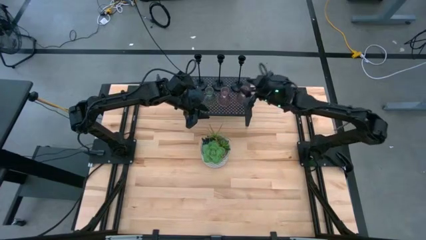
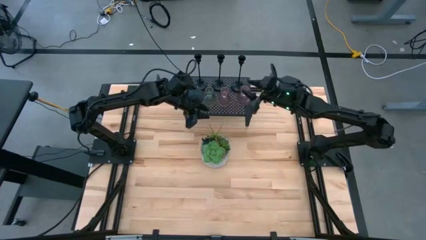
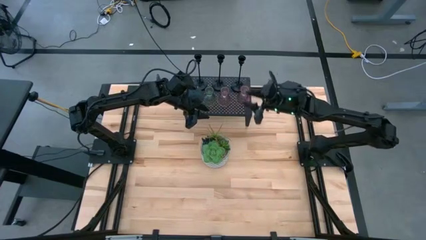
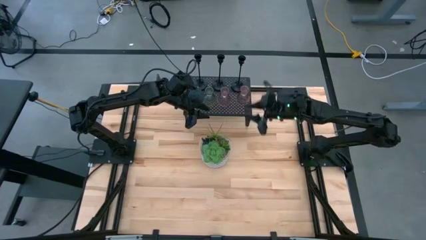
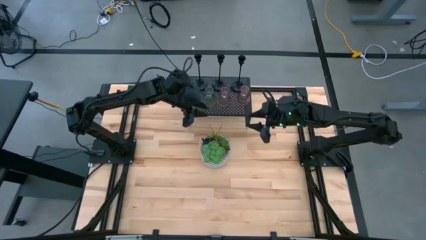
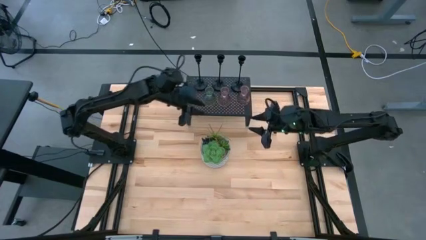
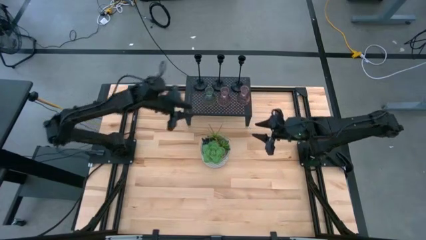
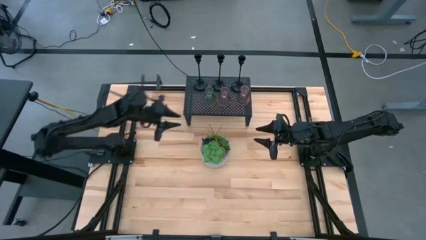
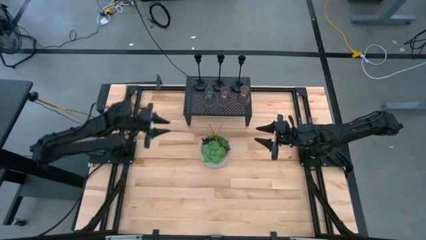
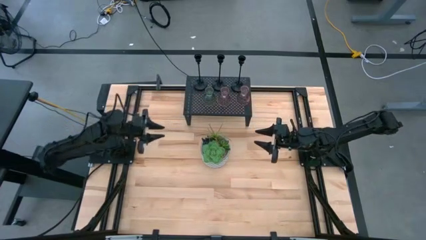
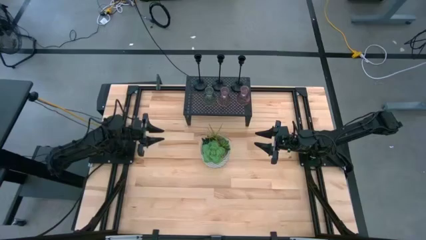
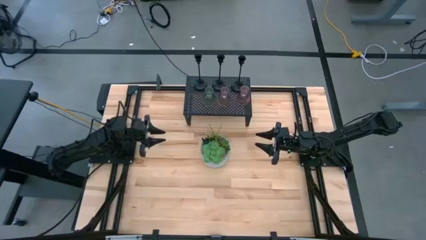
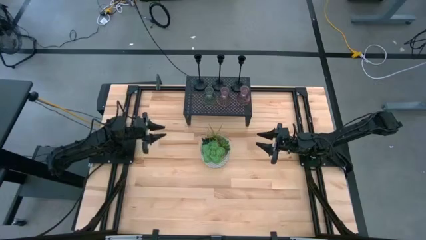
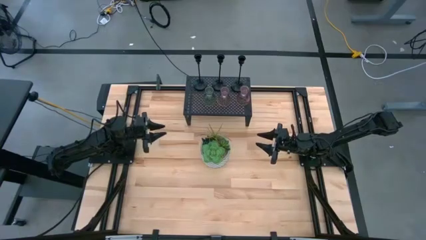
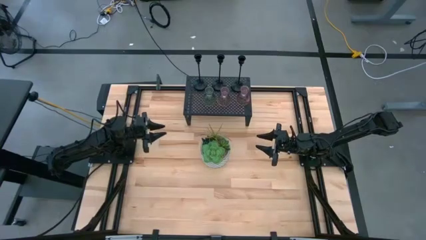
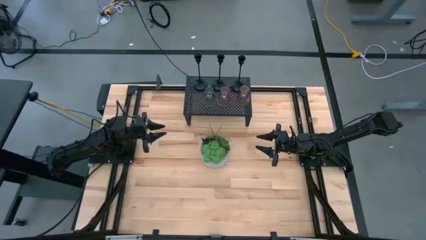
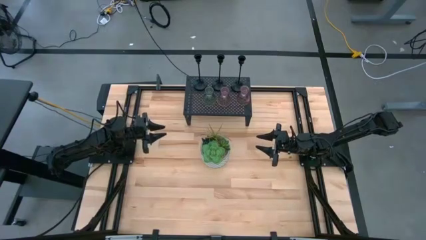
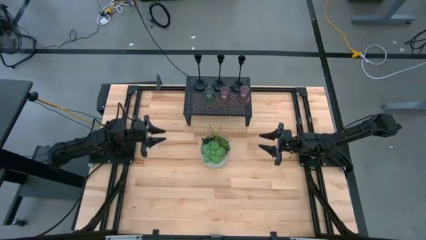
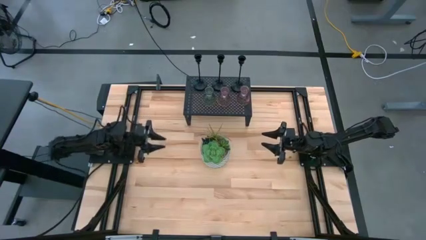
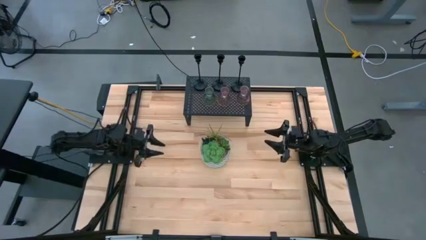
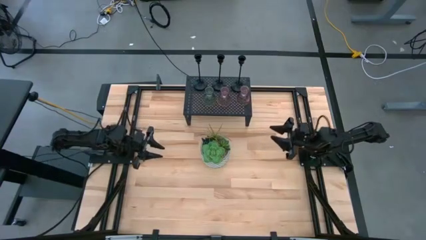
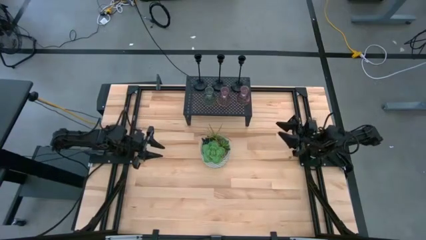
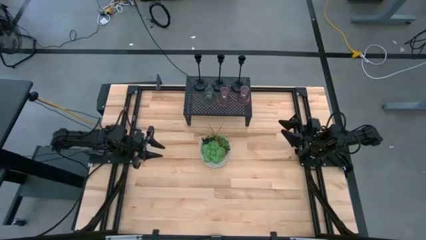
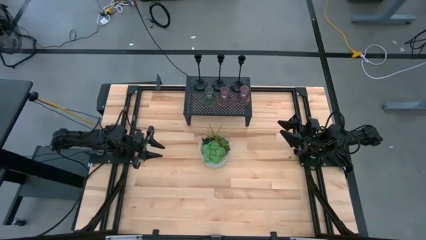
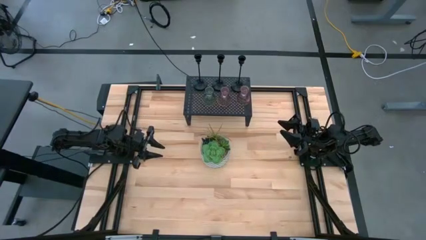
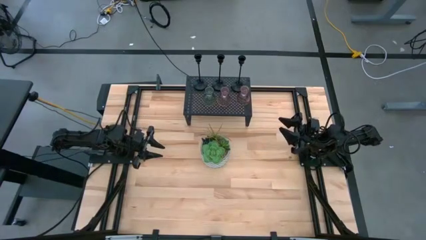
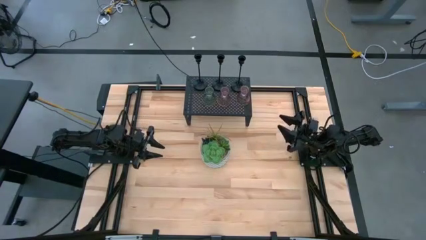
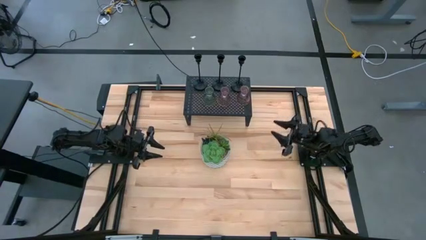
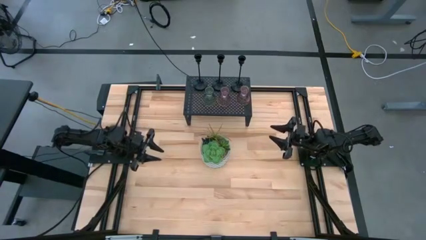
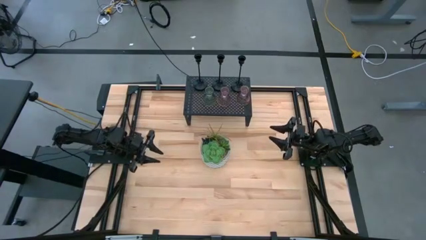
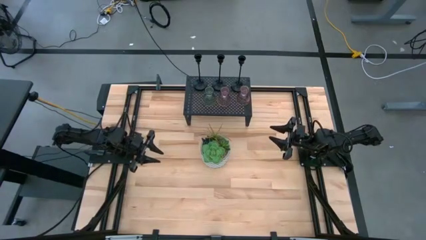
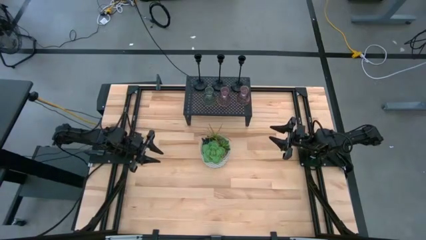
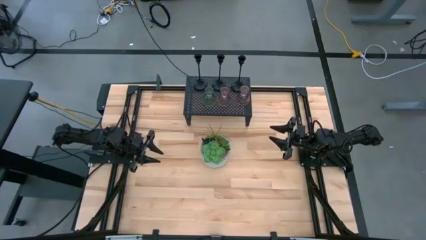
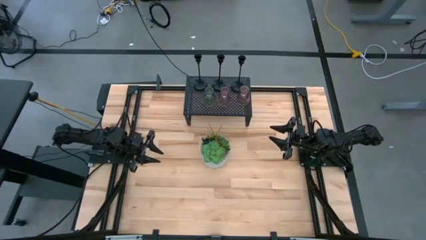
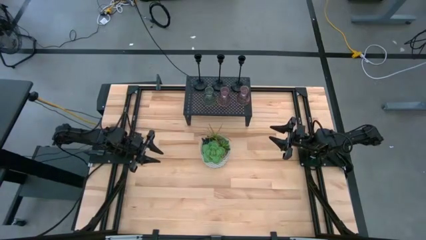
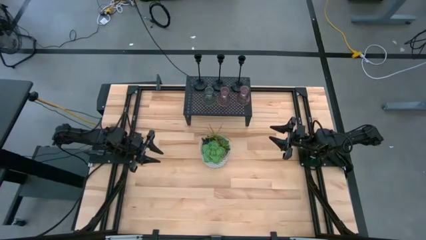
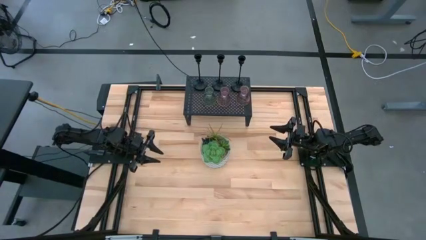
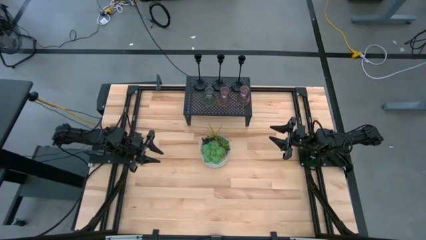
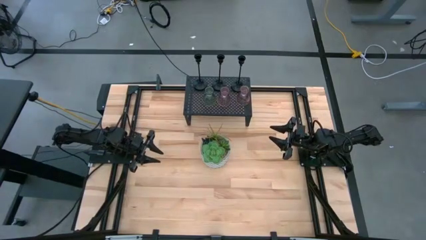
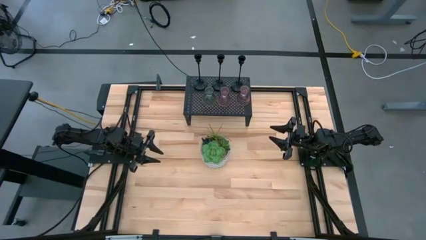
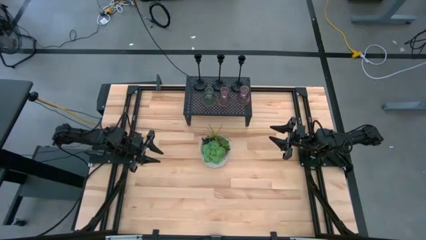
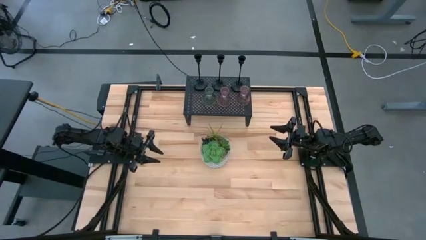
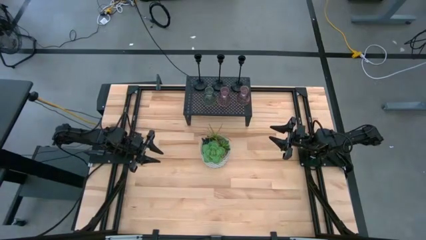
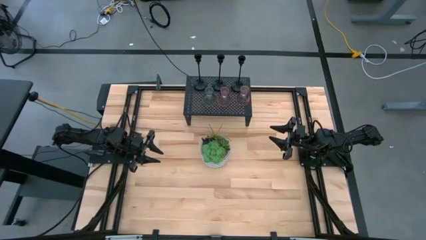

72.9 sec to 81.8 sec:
Task: Pick & Place candle stick holders
Return to Home Position

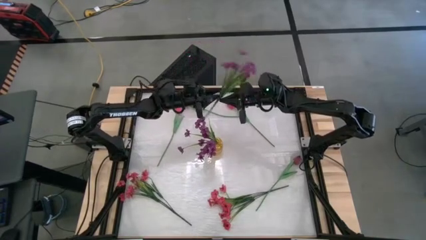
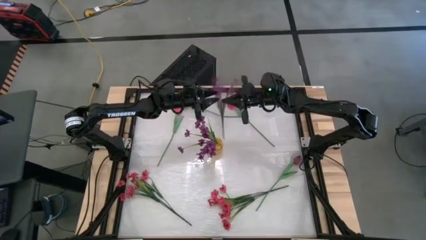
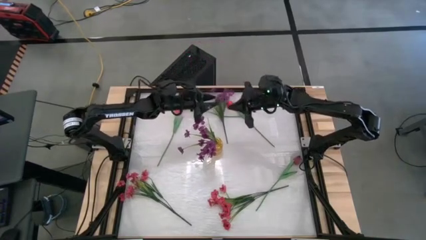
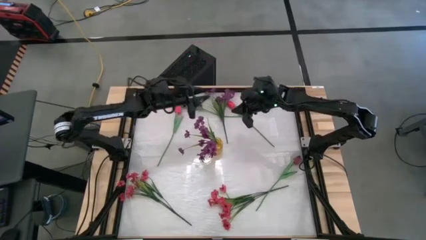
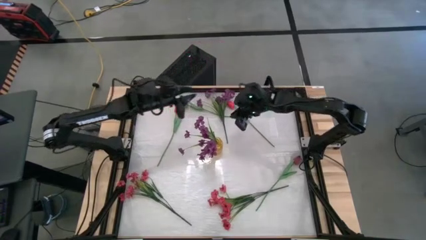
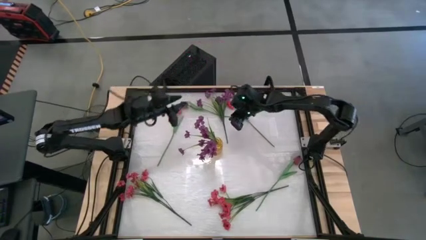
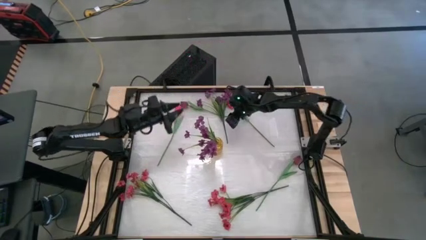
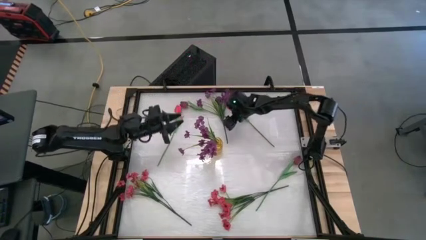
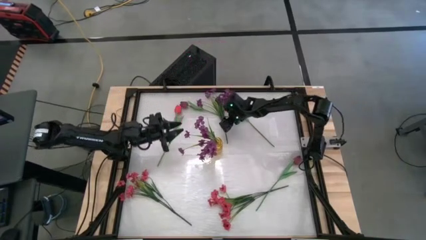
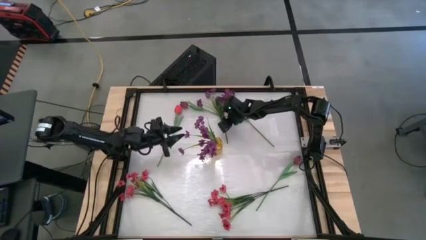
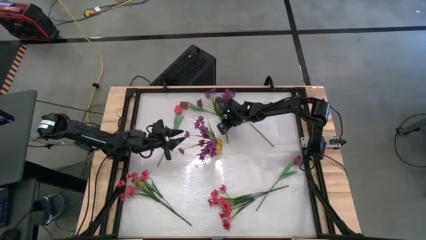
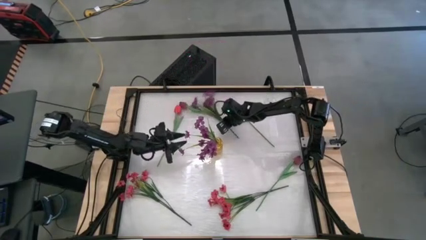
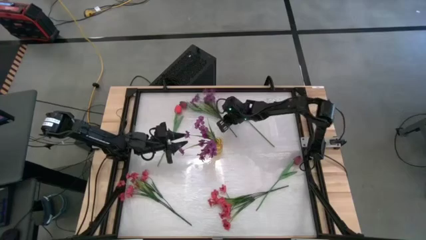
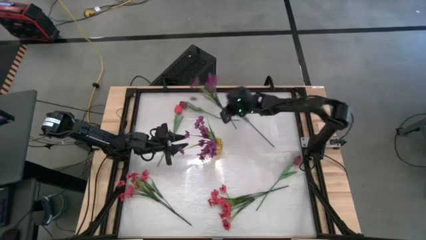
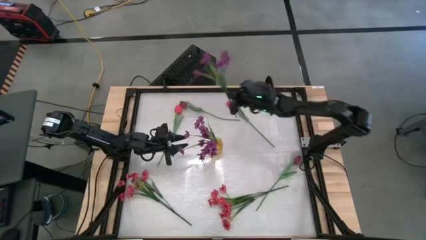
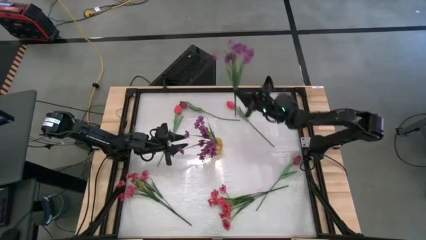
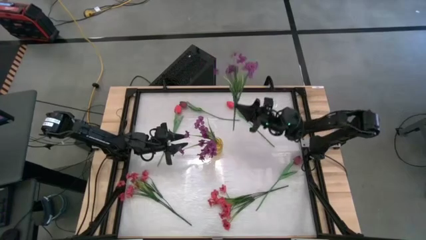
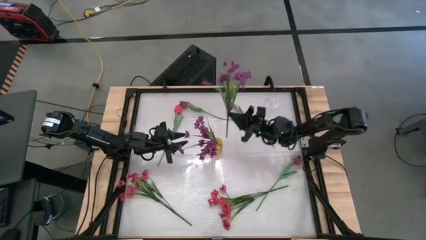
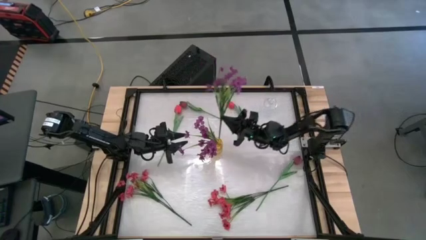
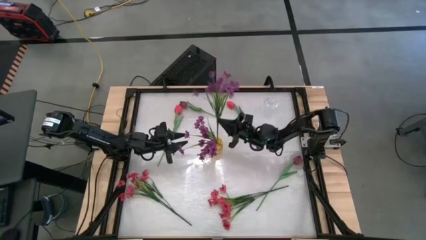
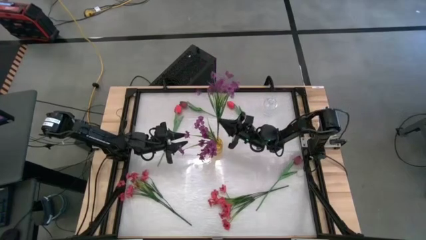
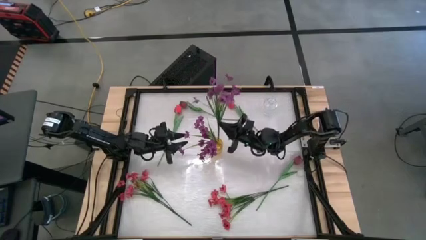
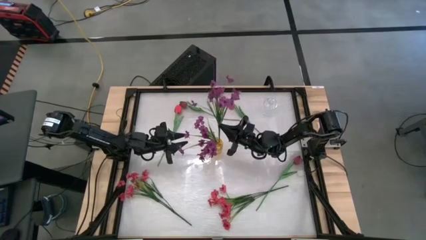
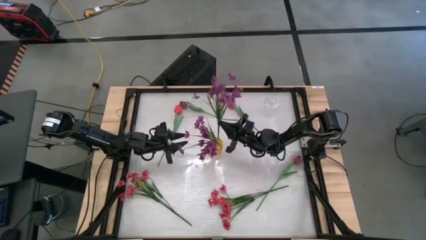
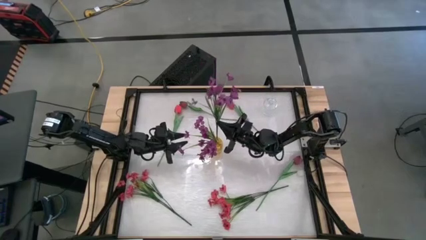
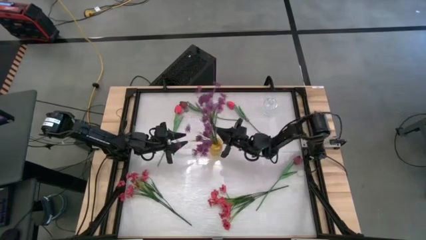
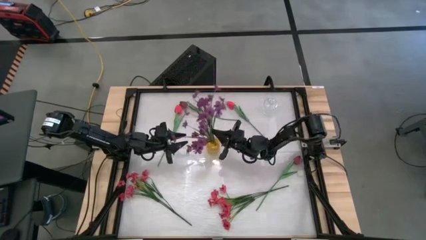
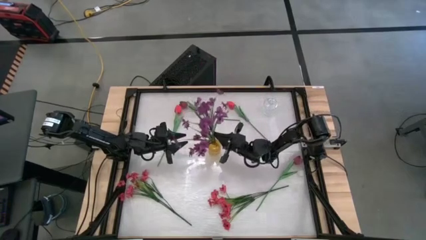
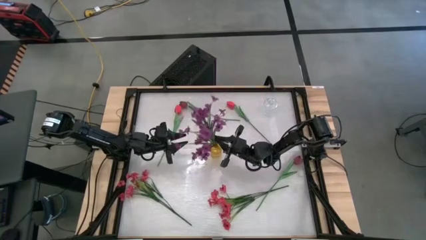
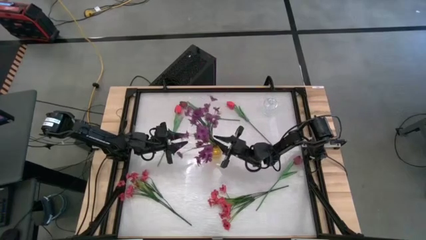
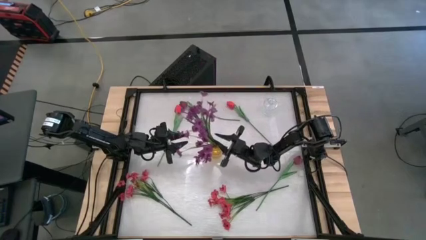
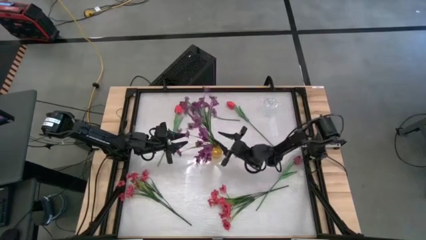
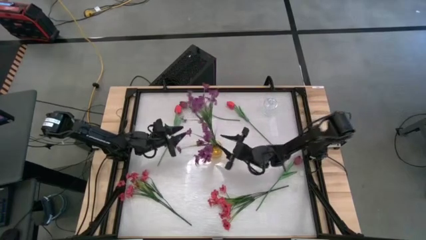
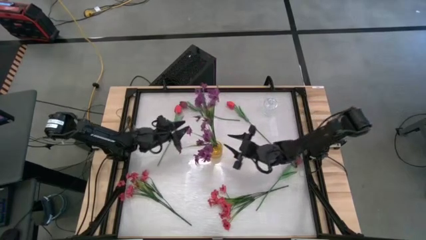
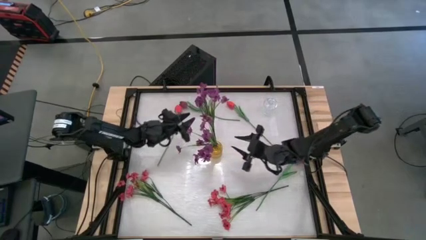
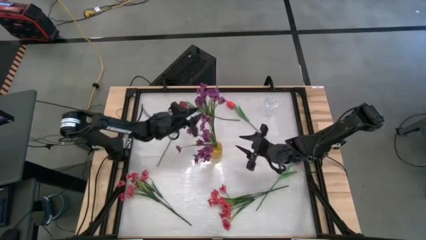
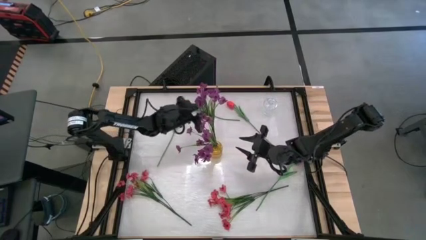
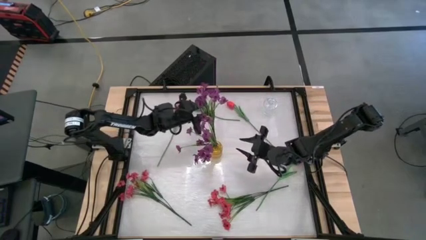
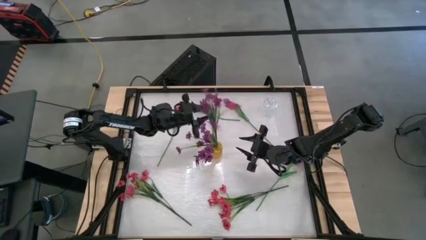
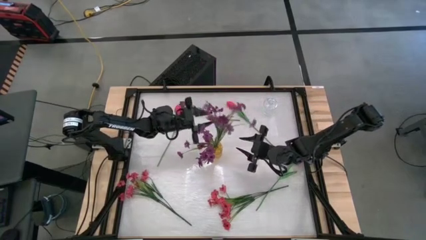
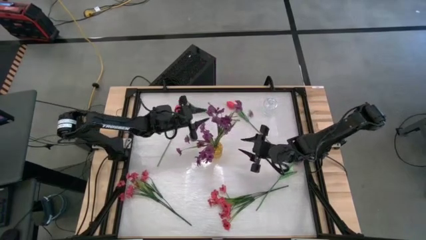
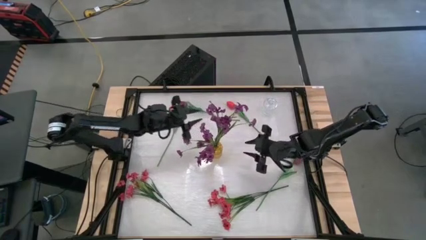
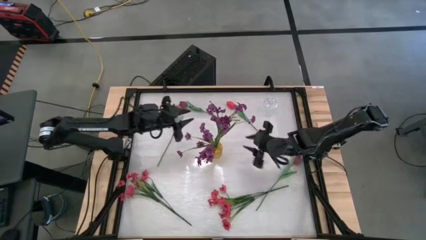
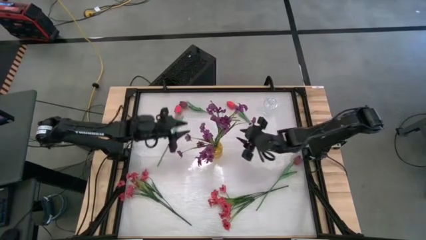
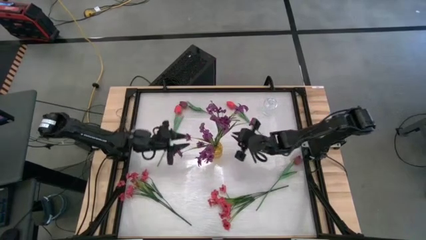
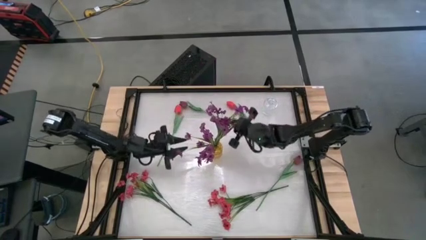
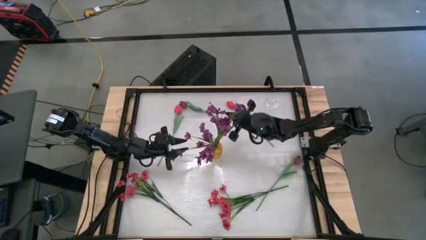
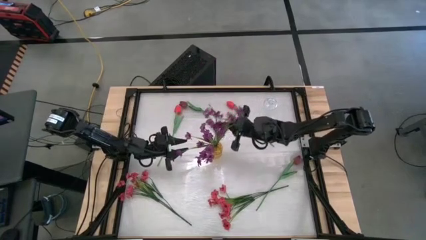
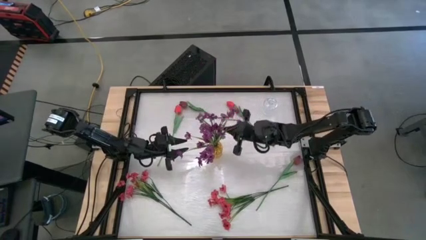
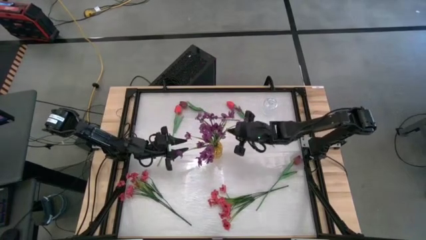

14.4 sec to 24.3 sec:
Task: Sort flowers into vase by color
Put the purple flowers into the yellow vase
